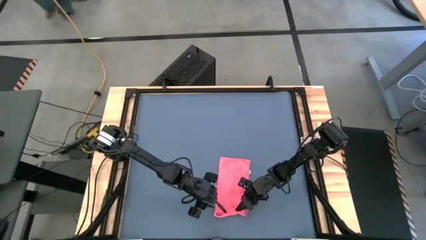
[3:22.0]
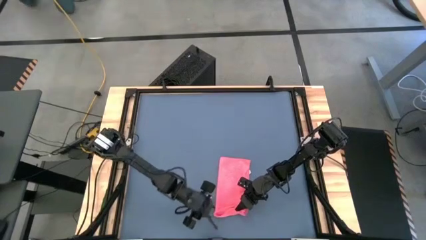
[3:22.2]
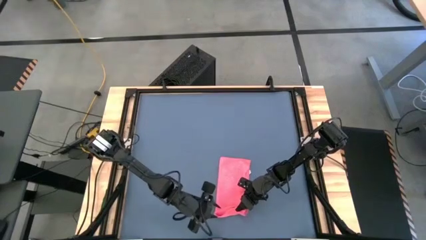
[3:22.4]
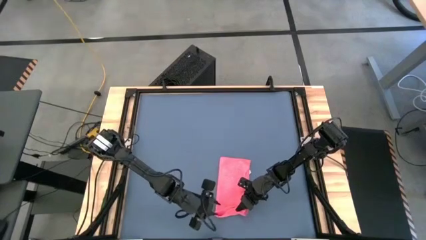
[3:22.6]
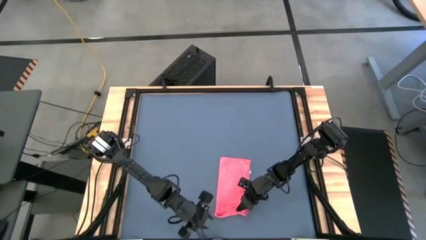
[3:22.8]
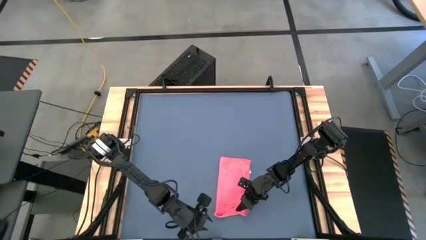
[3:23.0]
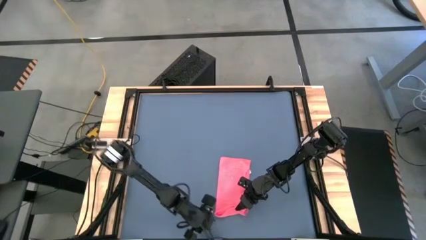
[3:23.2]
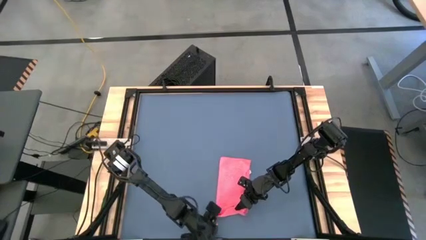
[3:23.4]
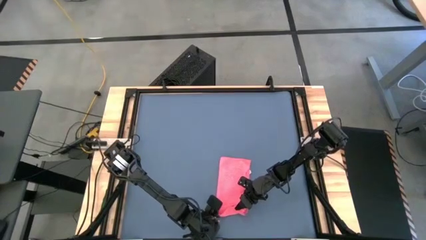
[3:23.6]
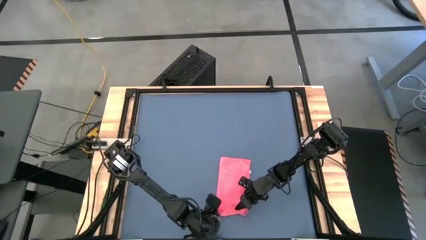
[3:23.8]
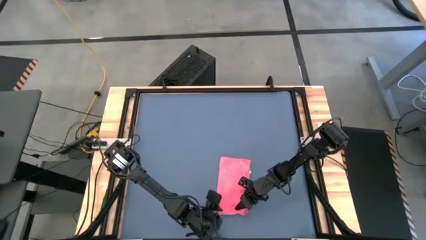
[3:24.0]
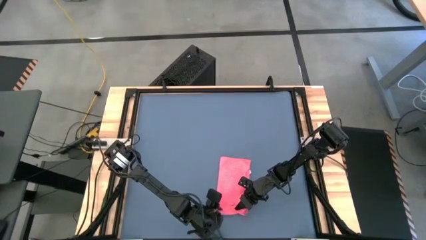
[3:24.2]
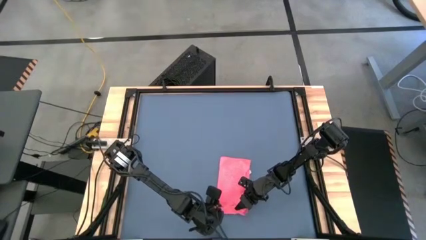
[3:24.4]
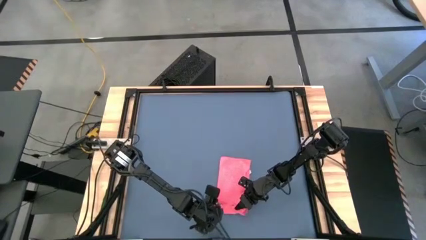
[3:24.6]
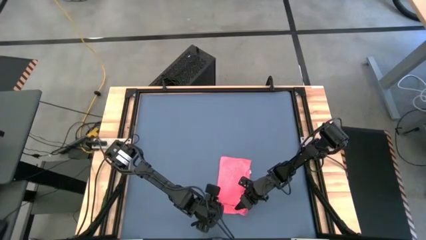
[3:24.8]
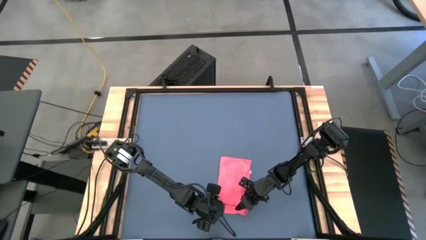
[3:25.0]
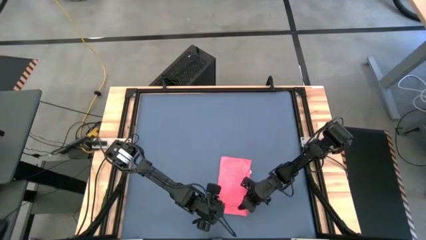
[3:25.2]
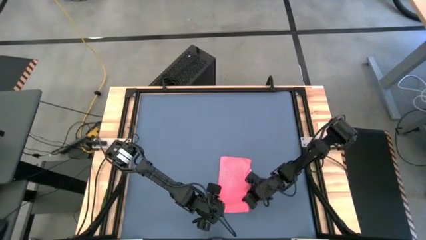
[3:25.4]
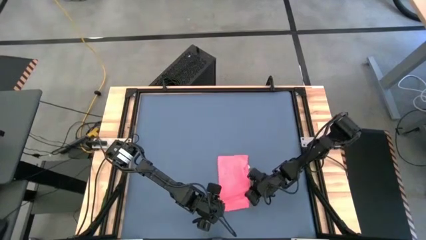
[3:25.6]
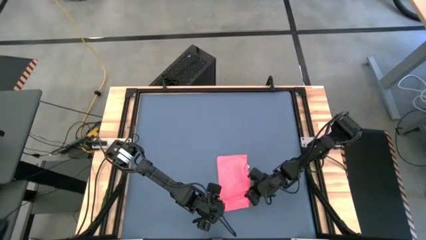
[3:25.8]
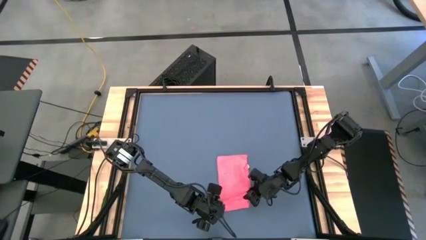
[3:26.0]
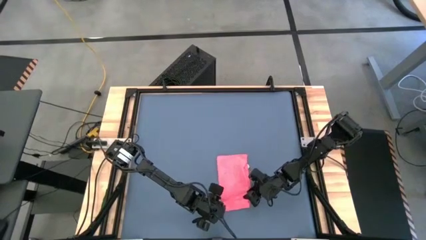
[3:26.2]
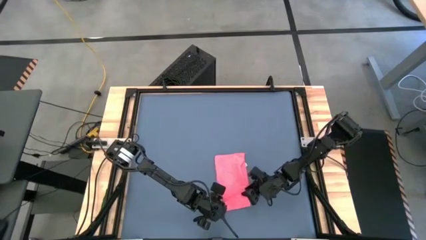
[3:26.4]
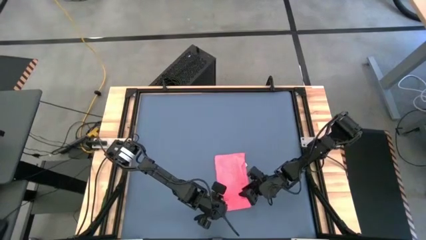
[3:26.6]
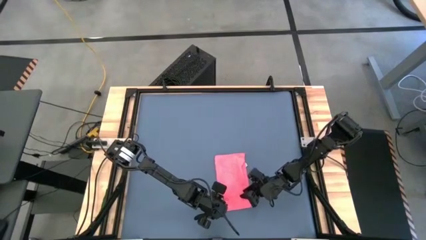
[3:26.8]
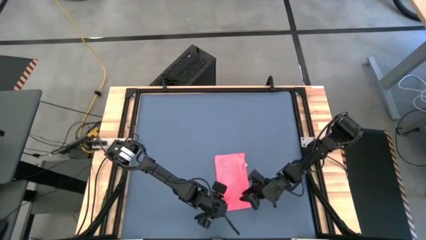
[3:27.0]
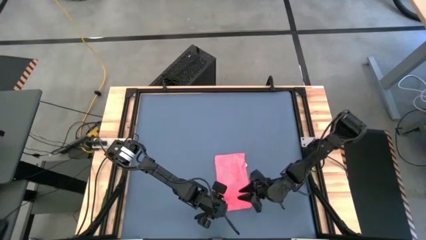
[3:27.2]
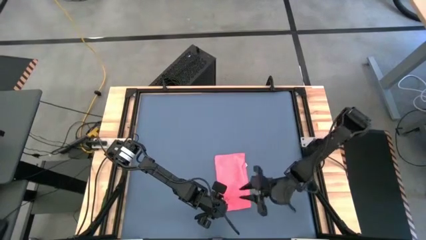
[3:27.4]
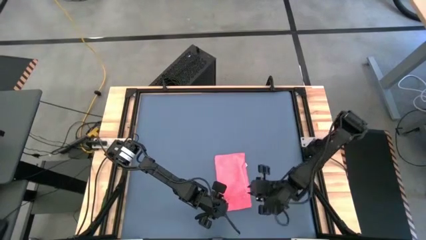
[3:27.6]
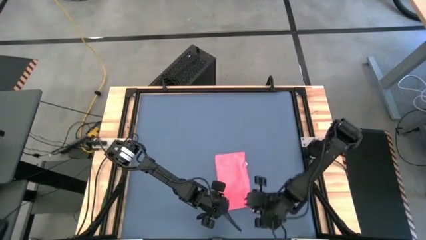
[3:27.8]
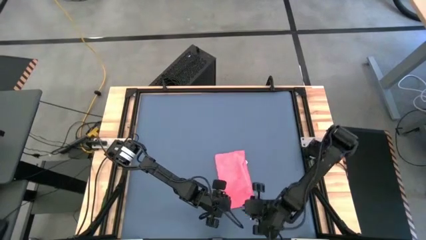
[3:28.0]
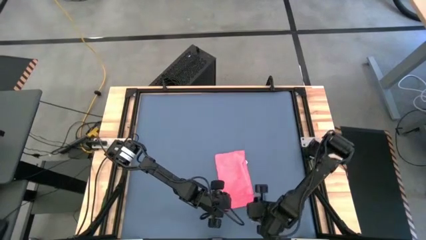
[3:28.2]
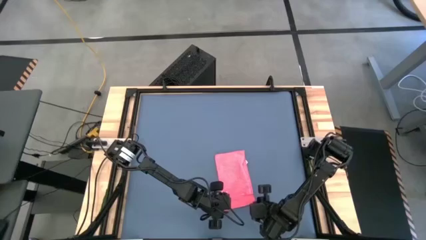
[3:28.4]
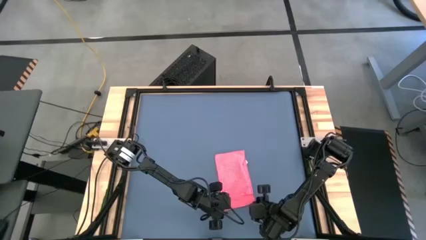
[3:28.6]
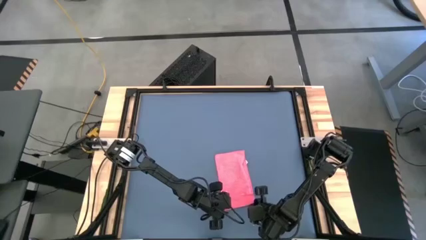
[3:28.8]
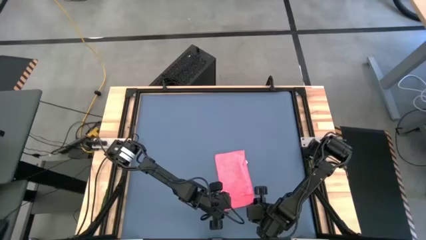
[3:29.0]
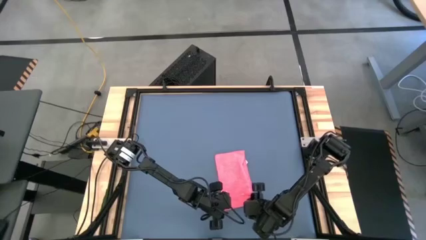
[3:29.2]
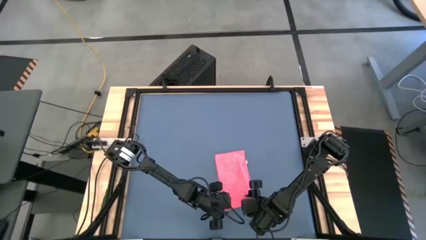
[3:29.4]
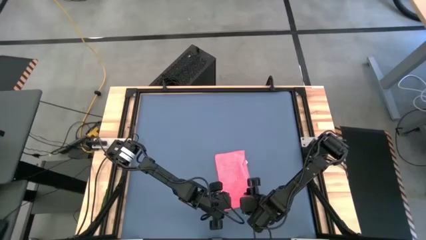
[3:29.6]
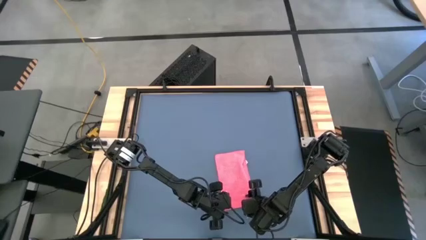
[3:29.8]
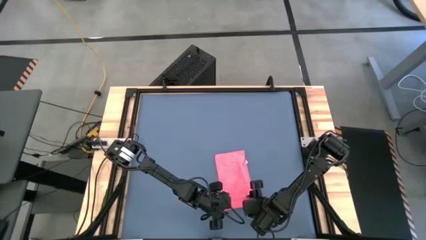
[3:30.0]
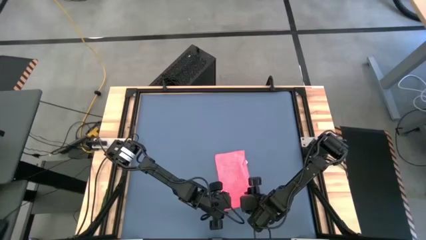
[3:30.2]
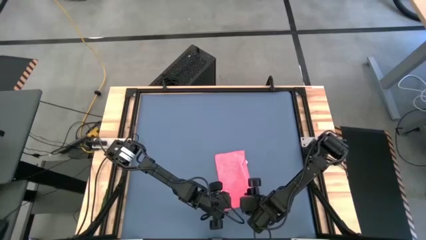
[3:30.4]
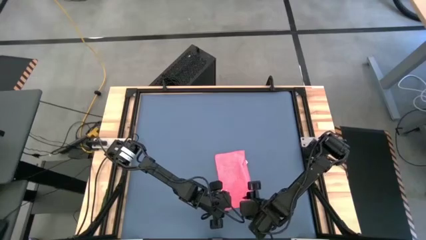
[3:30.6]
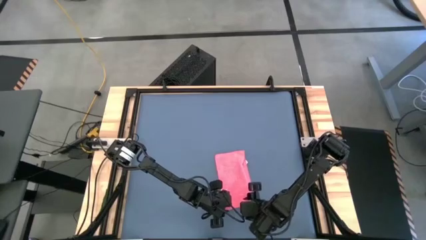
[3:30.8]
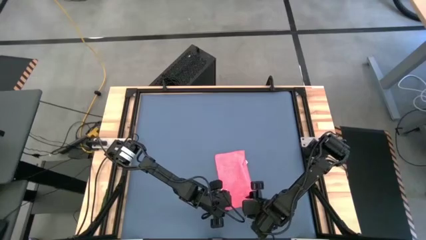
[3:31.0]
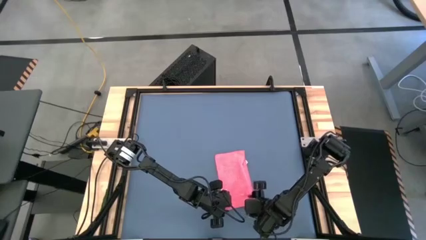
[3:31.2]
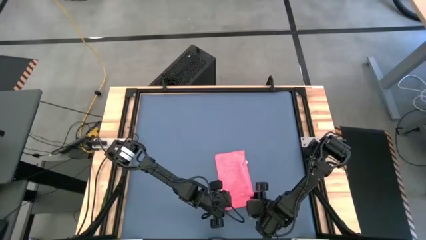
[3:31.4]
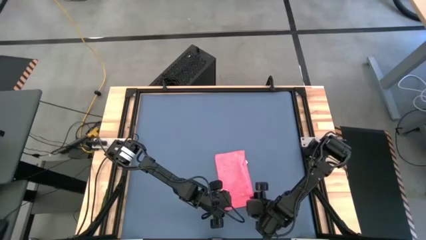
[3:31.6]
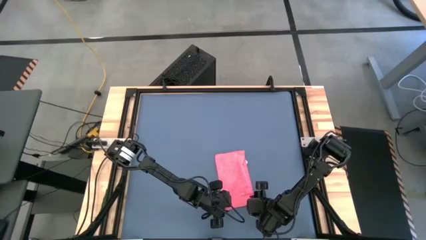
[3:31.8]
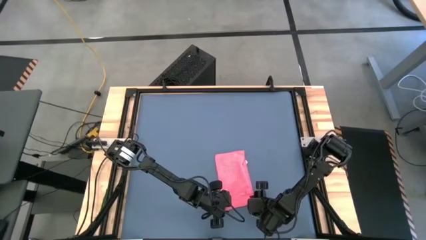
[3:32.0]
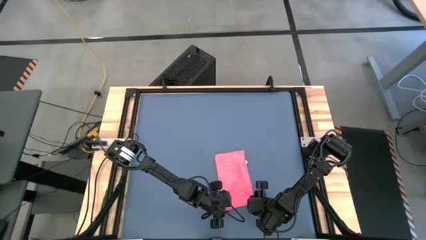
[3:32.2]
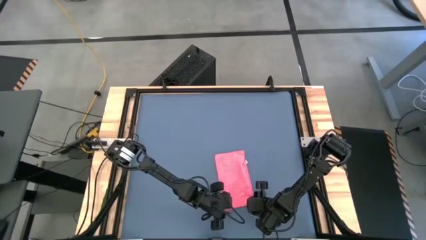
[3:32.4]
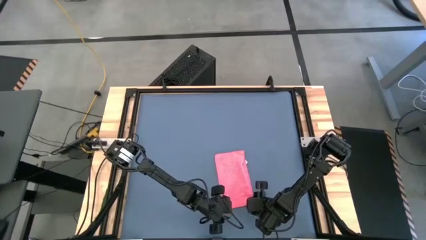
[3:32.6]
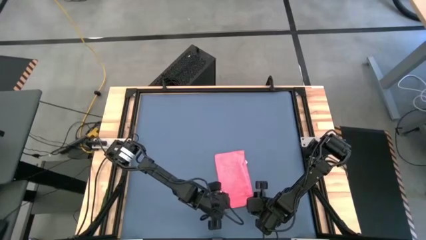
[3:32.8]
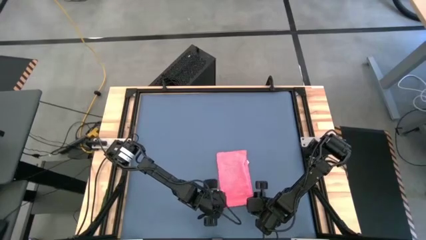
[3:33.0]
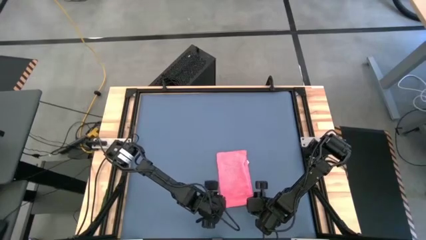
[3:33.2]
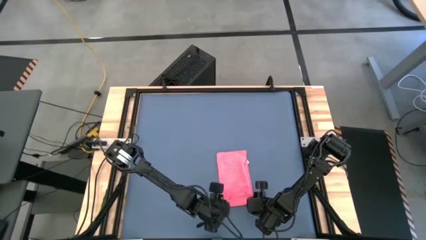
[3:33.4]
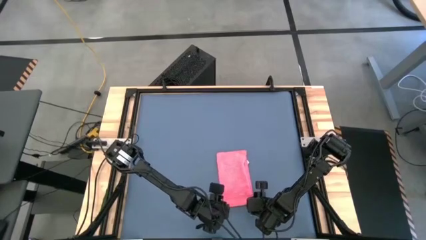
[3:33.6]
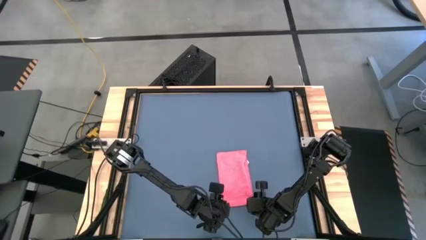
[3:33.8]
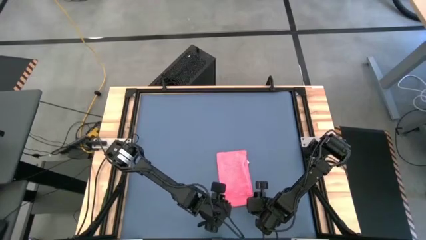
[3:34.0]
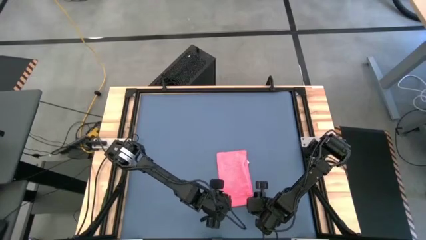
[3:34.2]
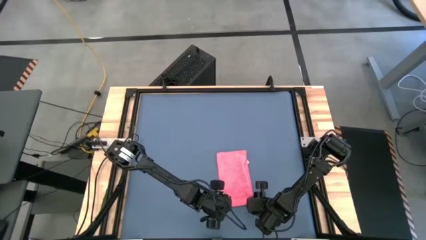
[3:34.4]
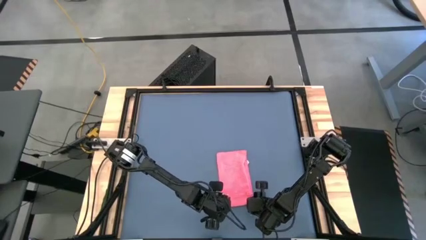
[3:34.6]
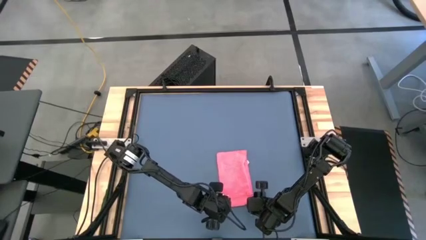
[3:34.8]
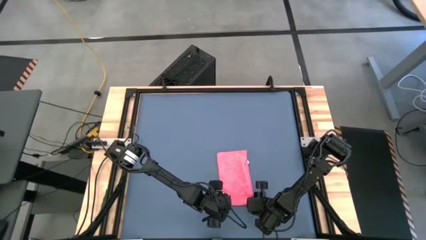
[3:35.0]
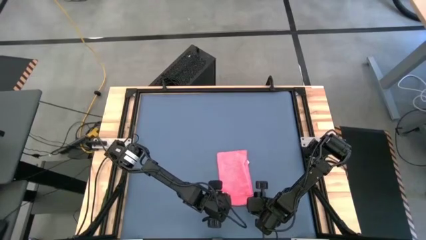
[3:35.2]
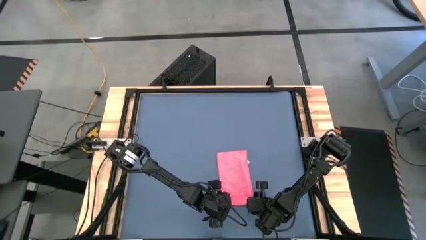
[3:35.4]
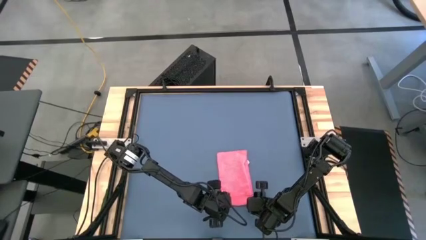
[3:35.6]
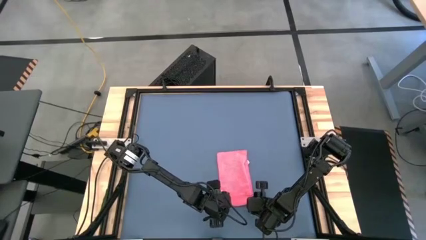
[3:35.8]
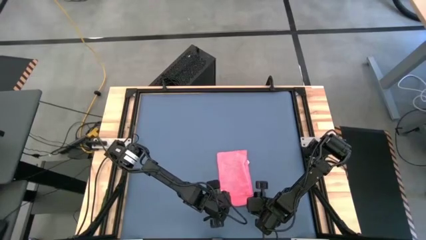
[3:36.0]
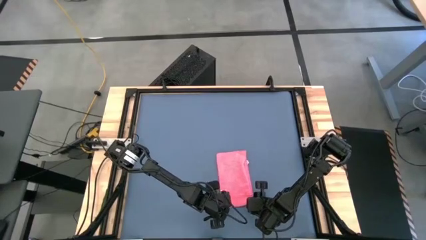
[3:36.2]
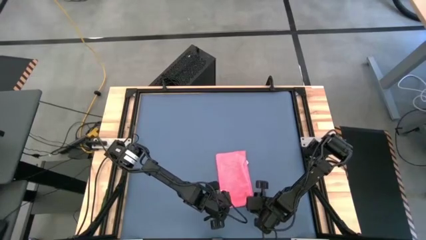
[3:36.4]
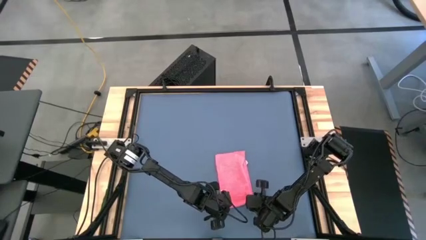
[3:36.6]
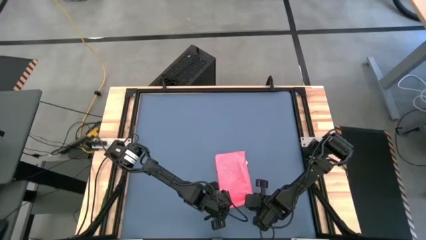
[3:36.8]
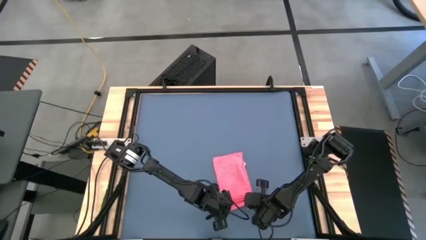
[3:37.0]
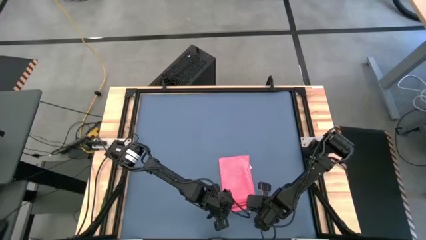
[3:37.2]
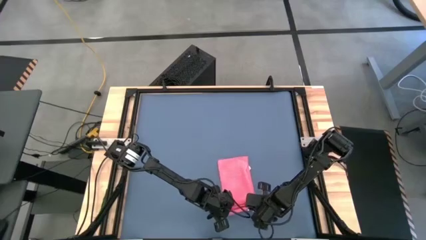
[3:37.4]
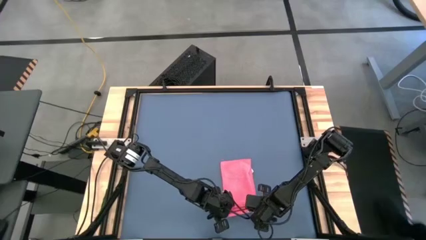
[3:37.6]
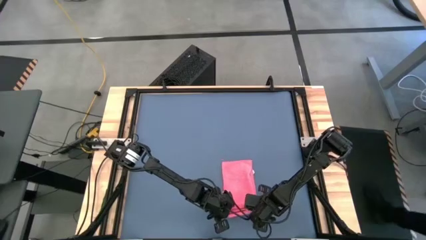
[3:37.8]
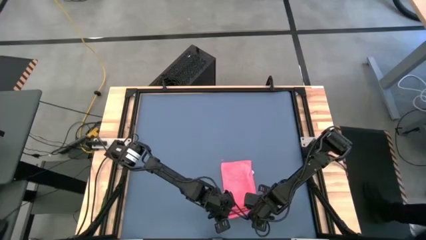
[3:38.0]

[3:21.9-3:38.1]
Task: Roll towel
Roll the pink microfiber towel
